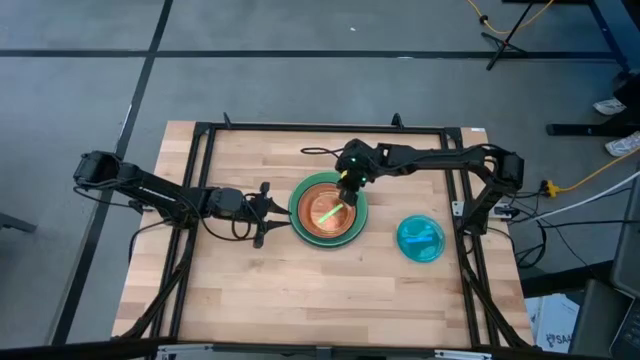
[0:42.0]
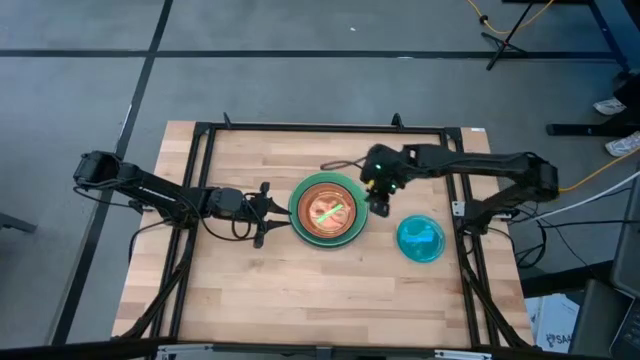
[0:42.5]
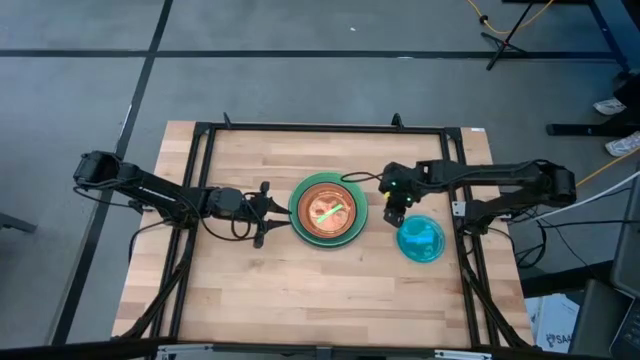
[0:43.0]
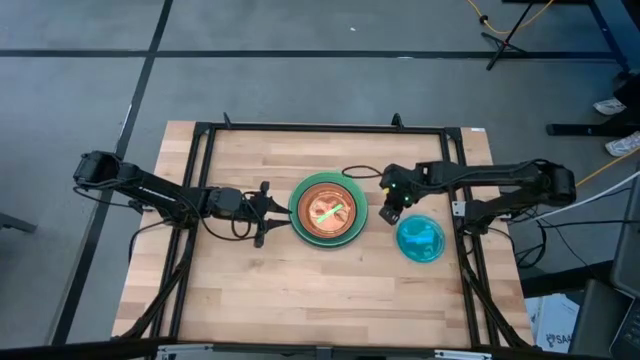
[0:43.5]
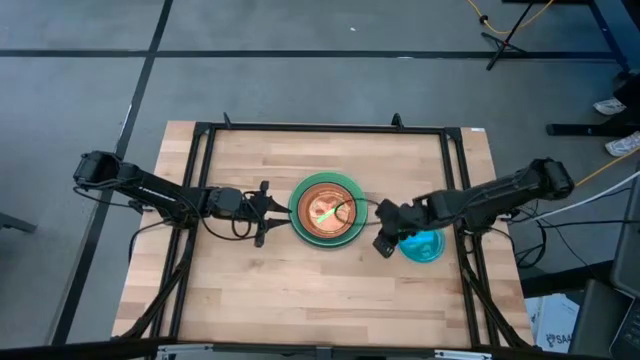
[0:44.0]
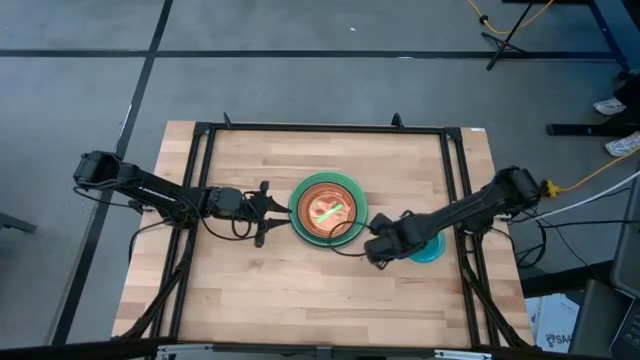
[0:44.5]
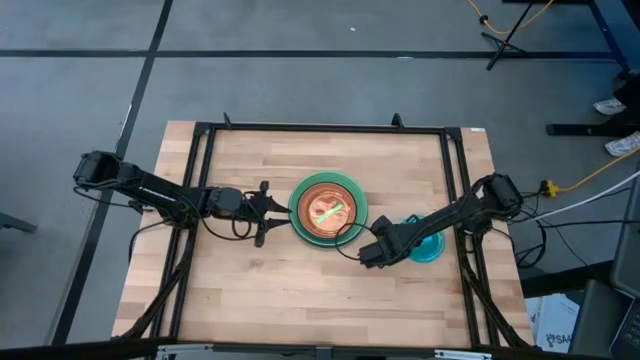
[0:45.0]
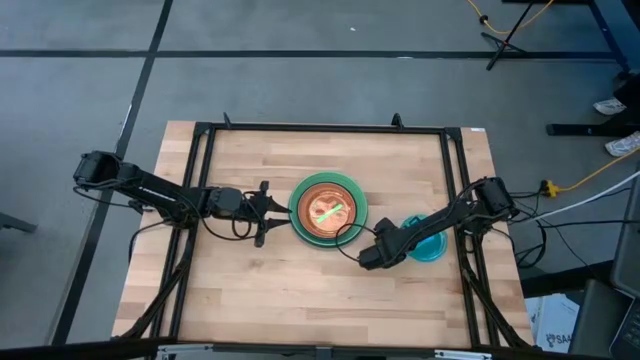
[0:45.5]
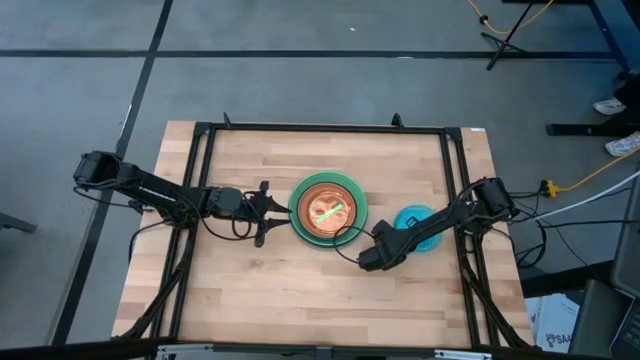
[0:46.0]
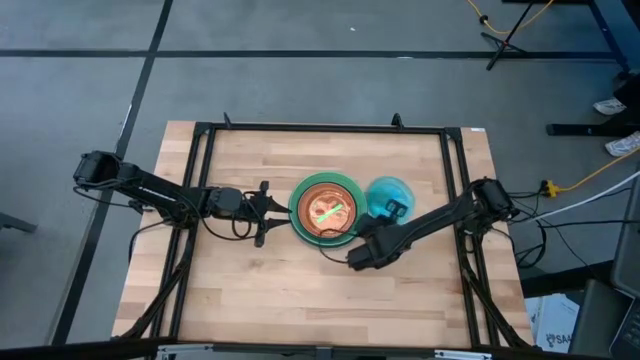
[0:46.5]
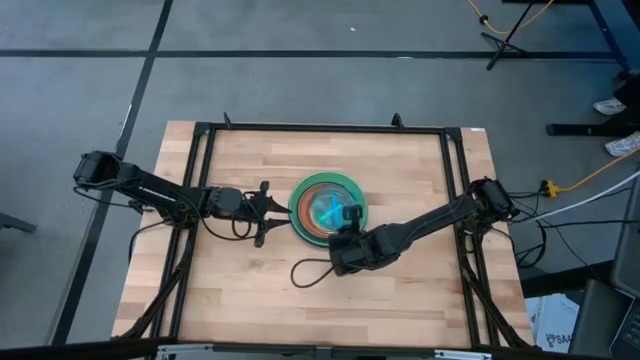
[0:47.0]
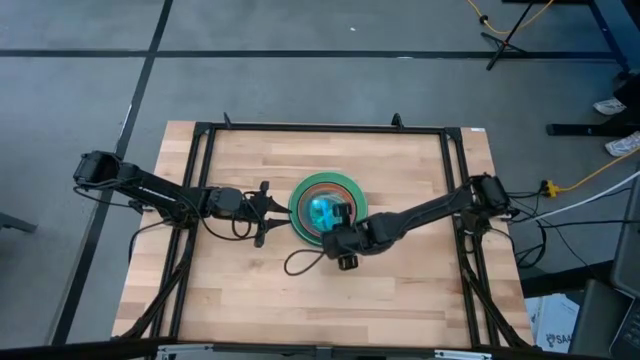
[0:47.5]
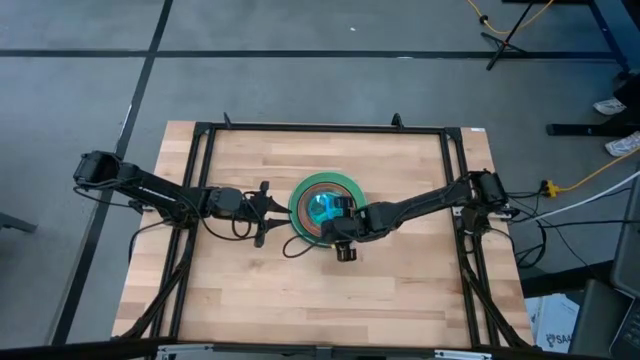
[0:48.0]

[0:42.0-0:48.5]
Task: Stack plastic plates
Stack the blue on top of the green plate

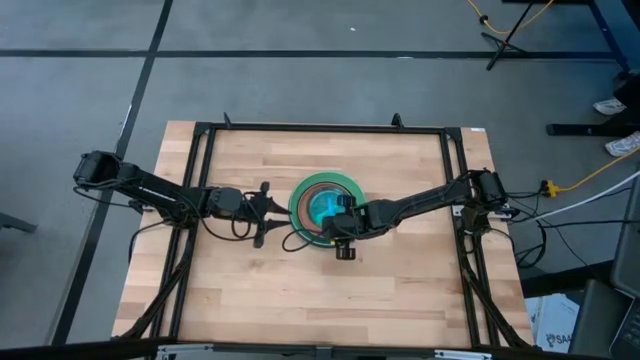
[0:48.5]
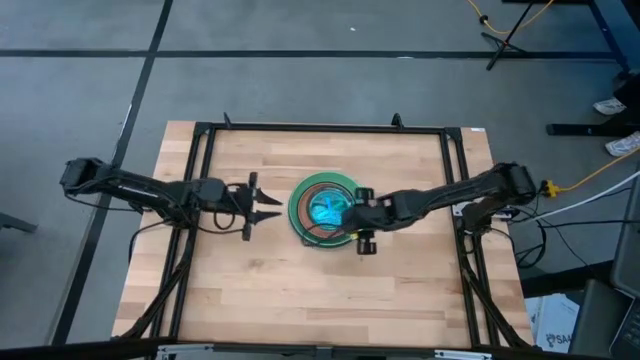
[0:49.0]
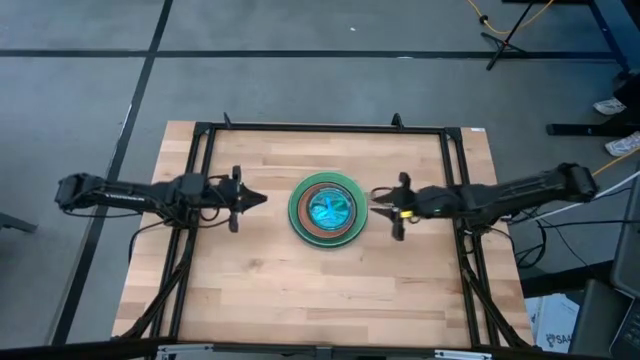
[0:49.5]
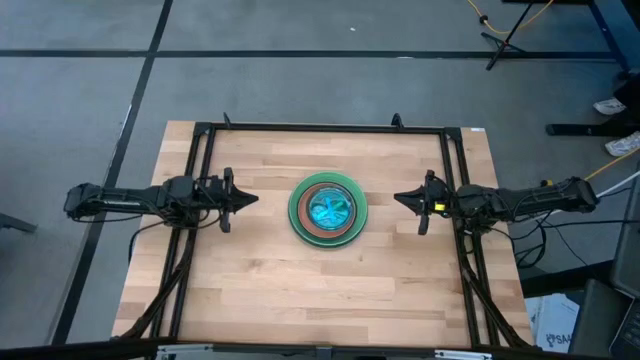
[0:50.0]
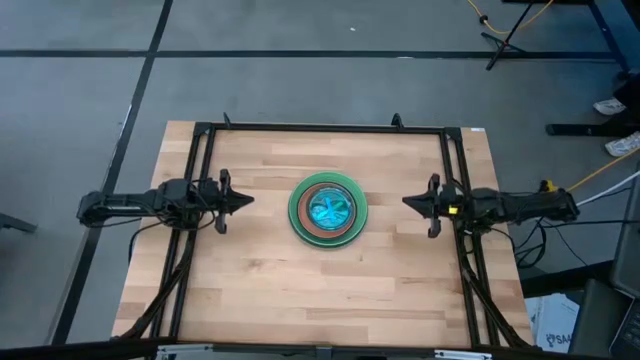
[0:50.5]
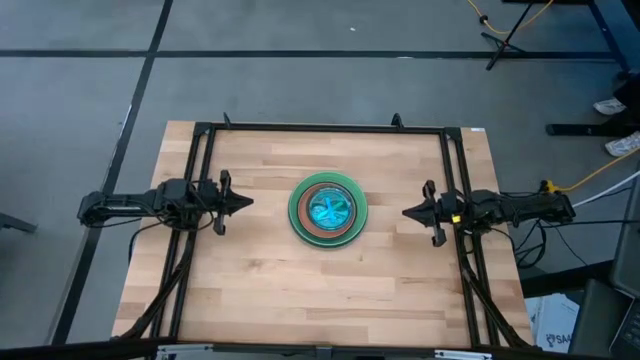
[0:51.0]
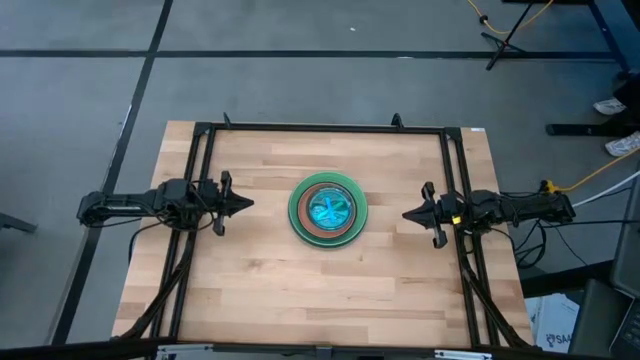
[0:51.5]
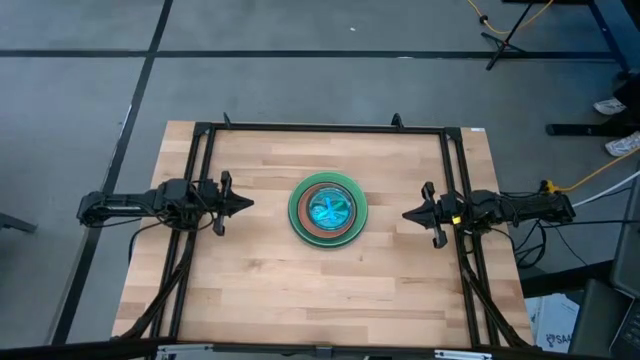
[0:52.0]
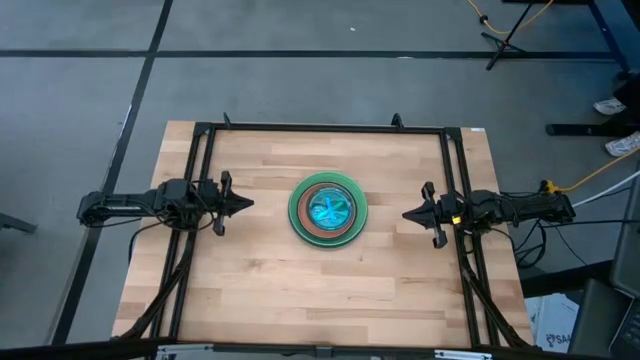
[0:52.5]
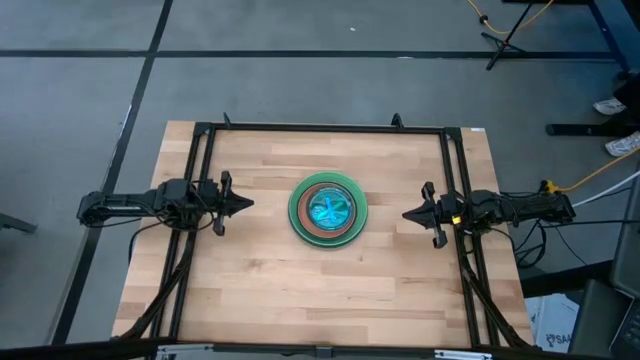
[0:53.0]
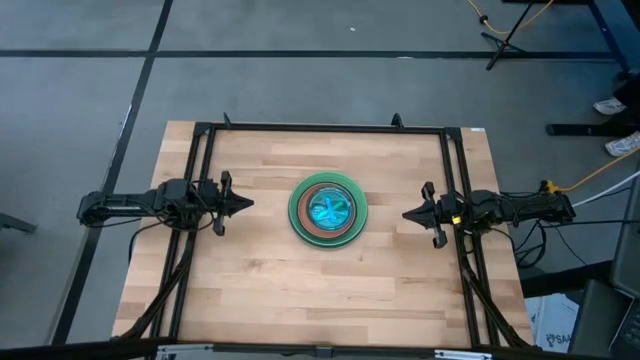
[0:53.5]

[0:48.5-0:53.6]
Return to Home Position

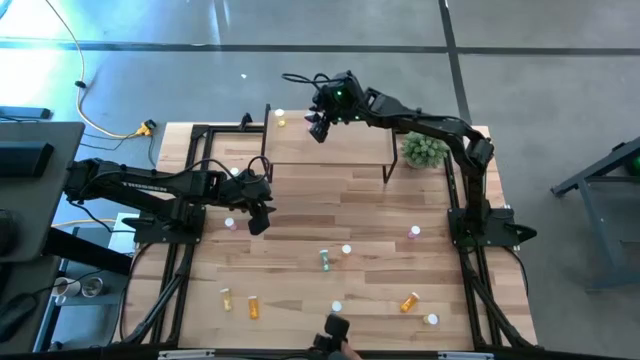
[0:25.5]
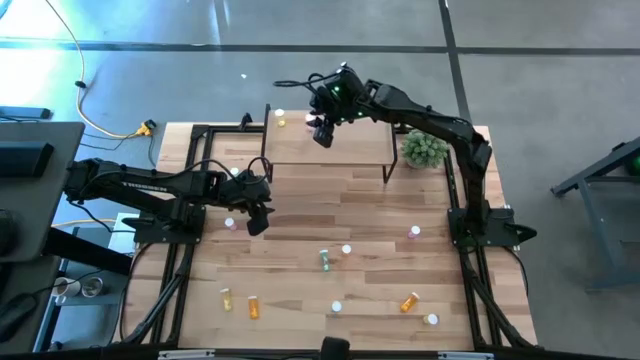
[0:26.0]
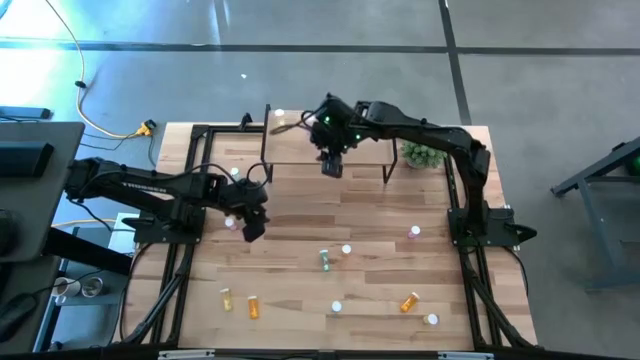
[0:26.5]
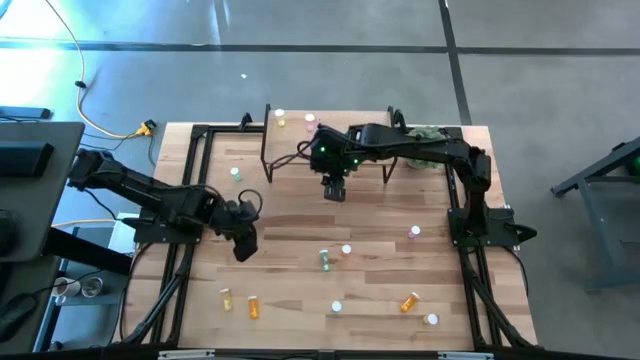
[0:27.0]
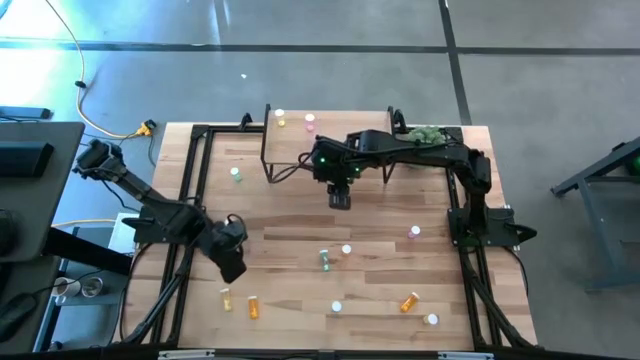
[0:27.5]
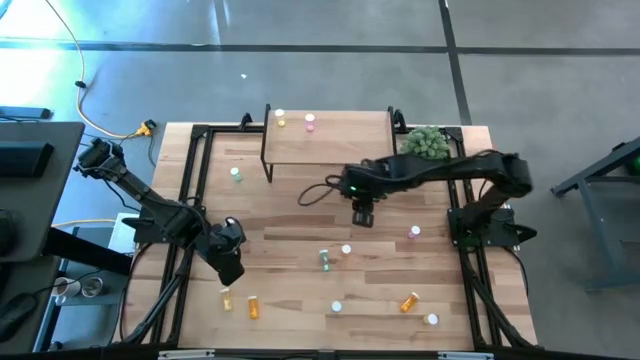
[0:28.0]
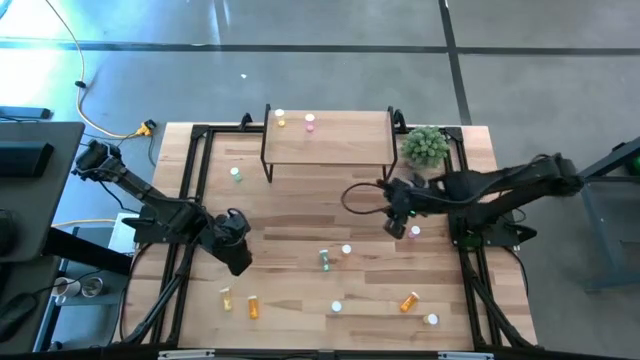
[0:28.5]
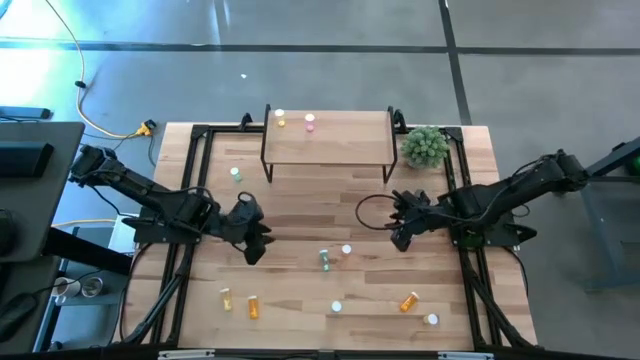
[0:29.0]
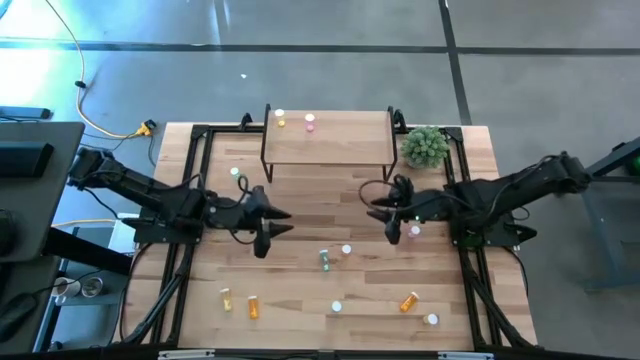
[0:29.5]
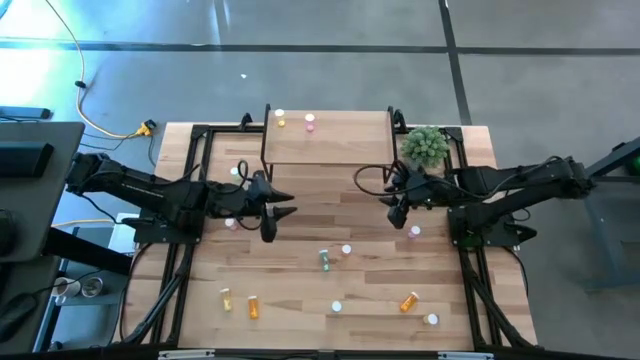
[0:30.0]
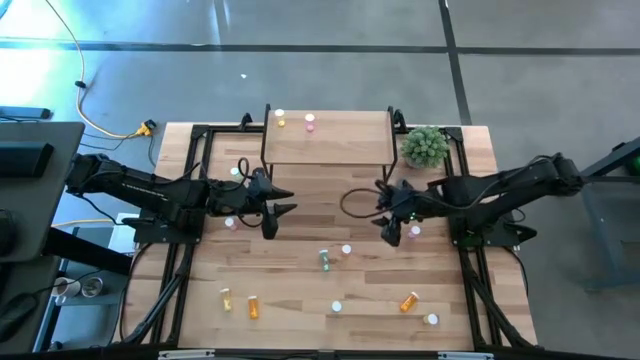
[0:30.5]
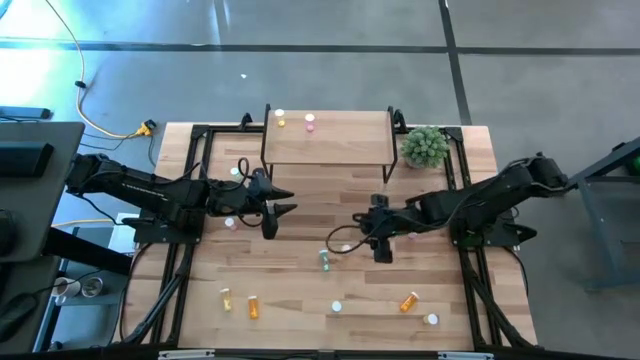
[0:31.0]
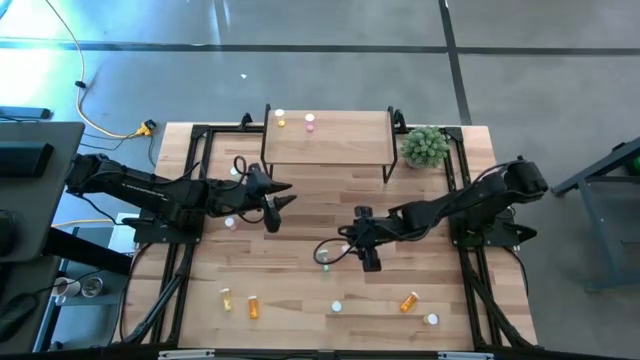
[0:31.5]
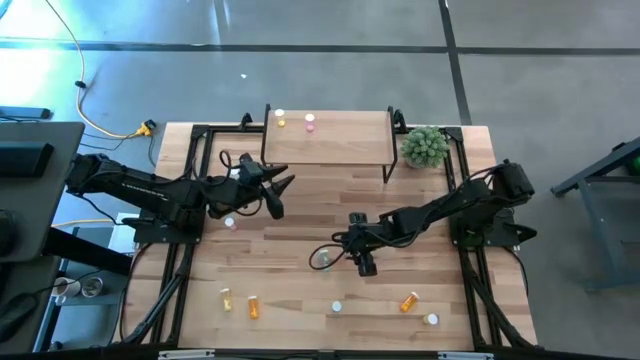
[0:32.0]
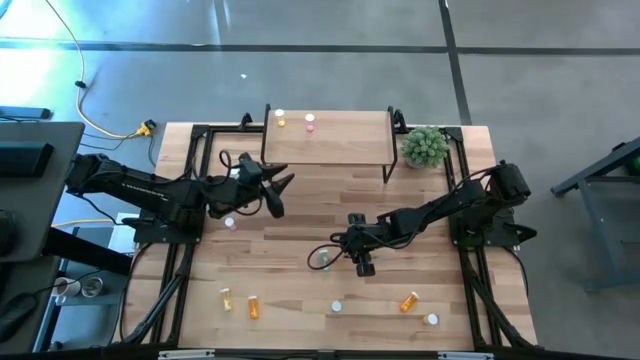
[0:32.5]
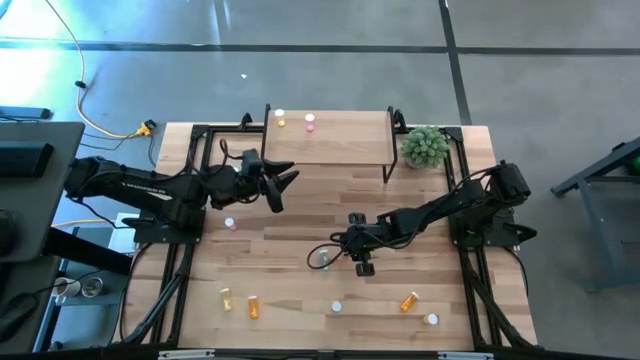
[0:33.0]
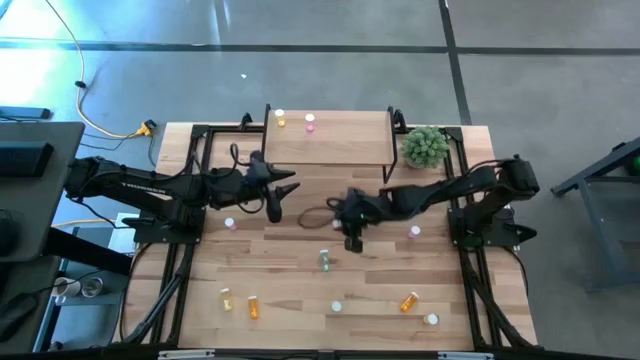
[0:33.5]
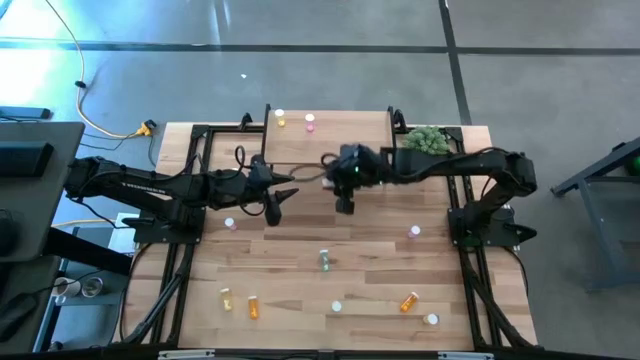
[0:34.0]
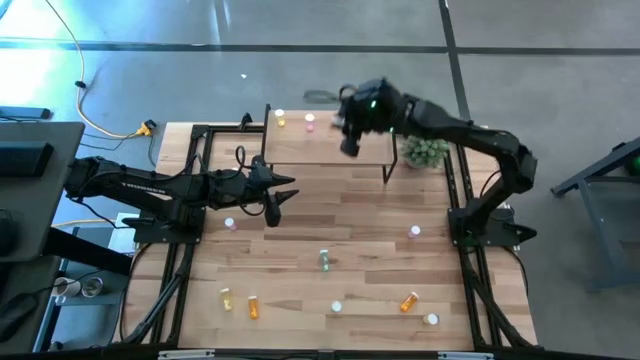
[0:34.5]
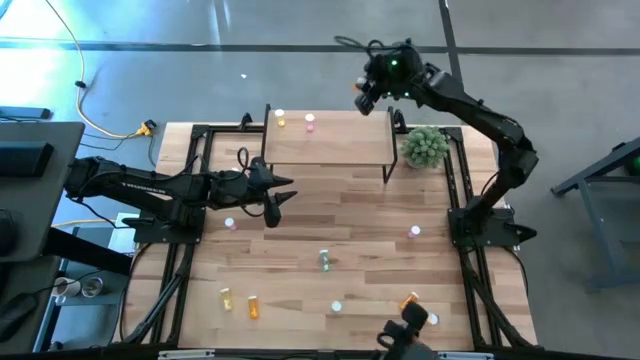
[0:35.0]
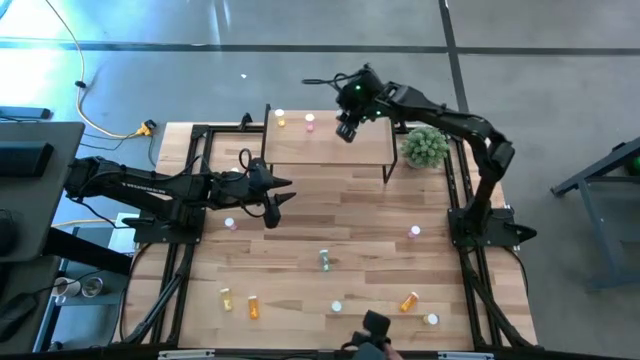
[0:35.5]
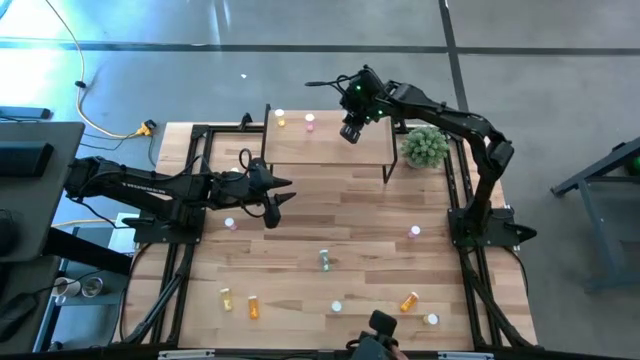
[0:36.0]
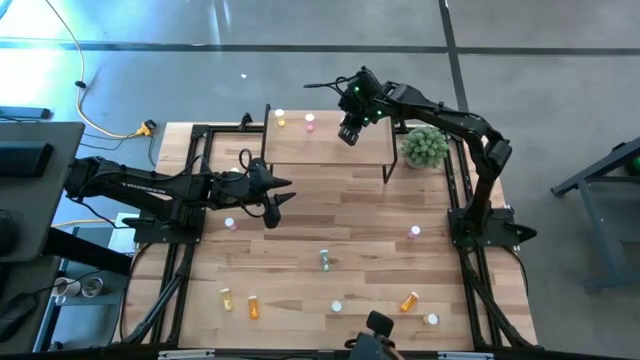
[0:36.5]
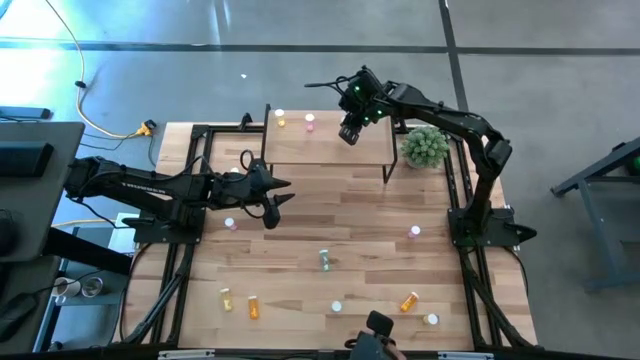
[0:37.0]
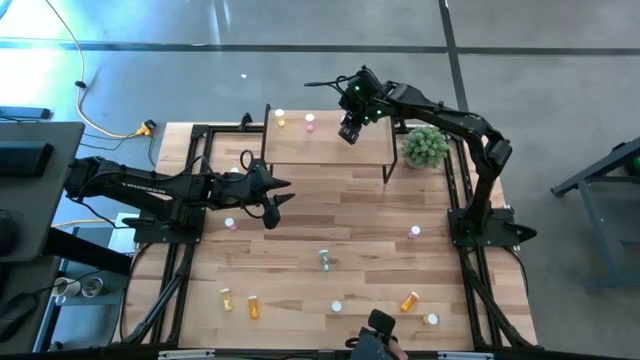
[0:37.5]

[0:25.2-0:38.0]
Task: Pick and place medicine bottles onto shelf by color
Put the top orange pill bottle on the shelf
